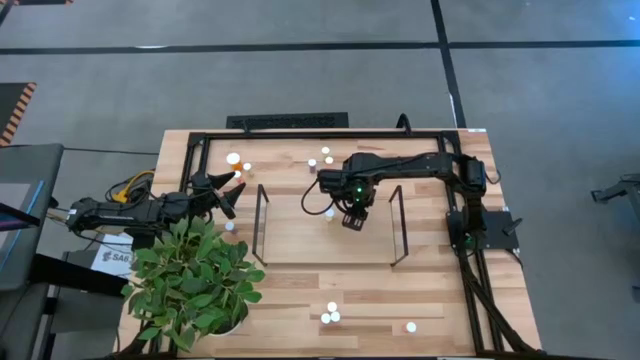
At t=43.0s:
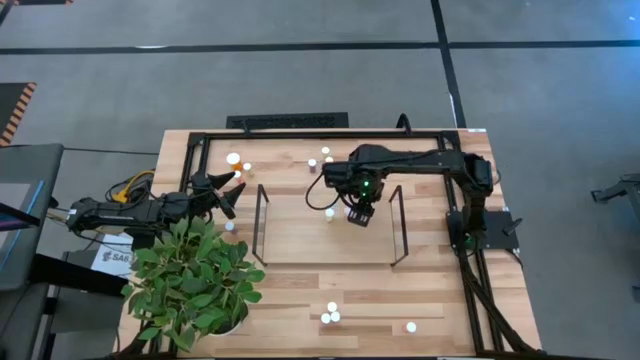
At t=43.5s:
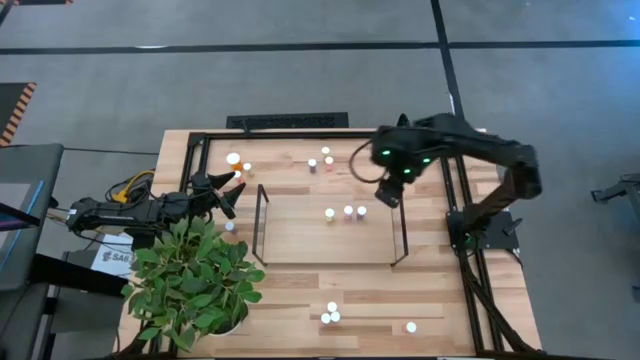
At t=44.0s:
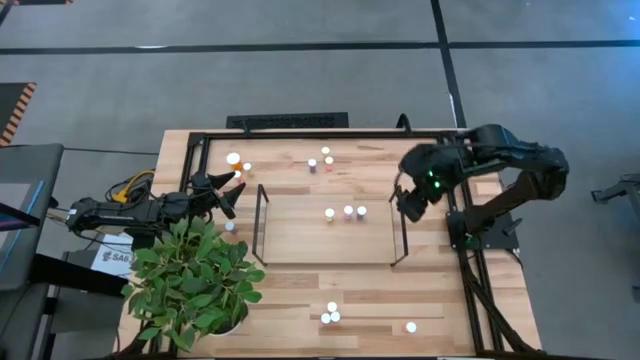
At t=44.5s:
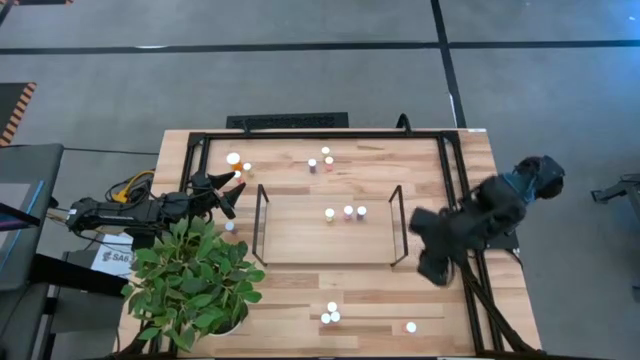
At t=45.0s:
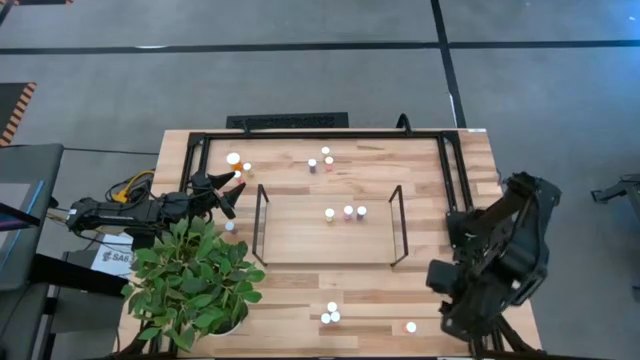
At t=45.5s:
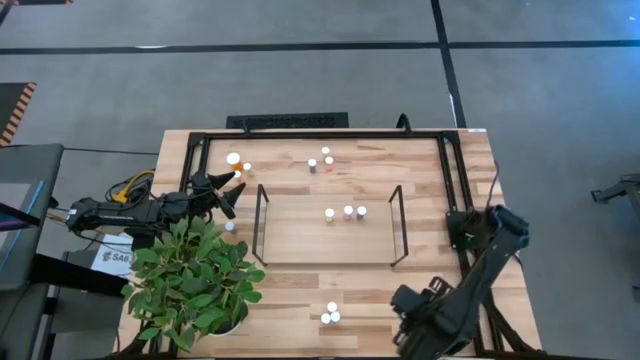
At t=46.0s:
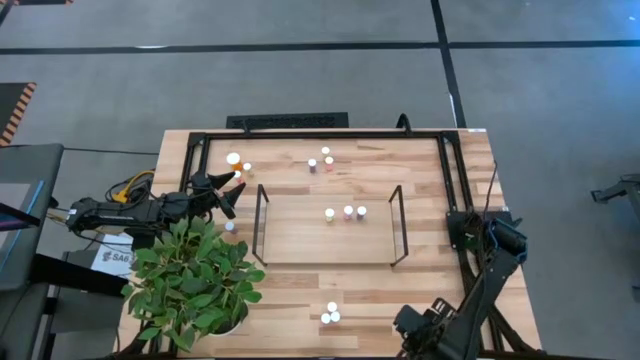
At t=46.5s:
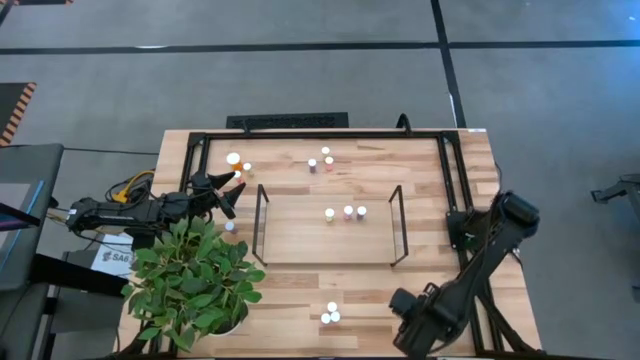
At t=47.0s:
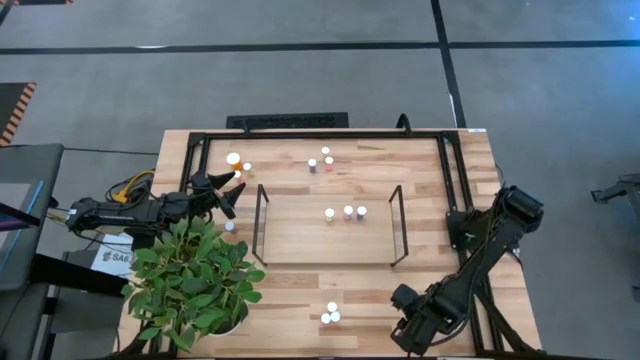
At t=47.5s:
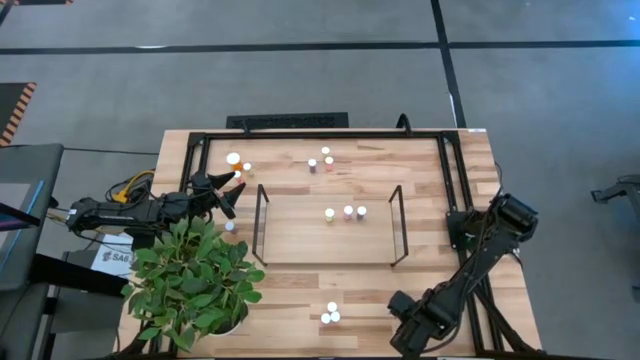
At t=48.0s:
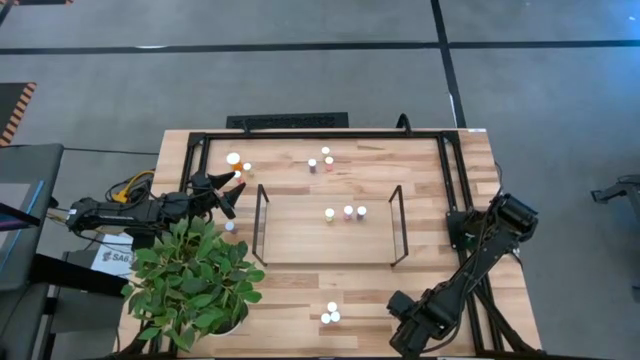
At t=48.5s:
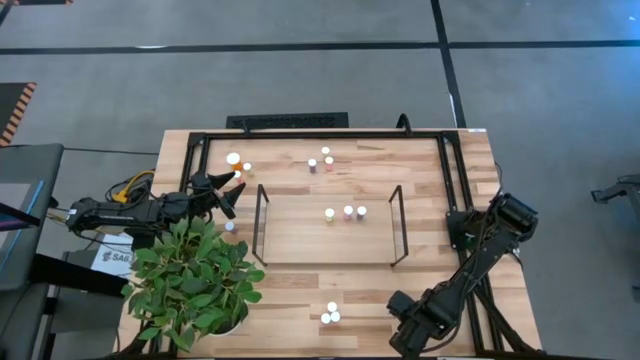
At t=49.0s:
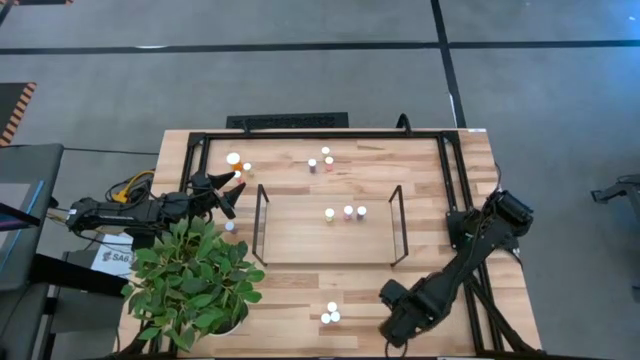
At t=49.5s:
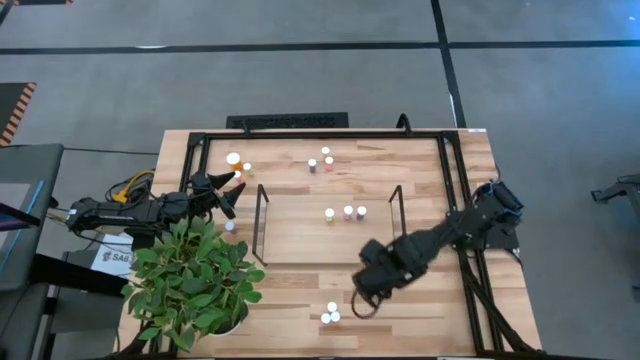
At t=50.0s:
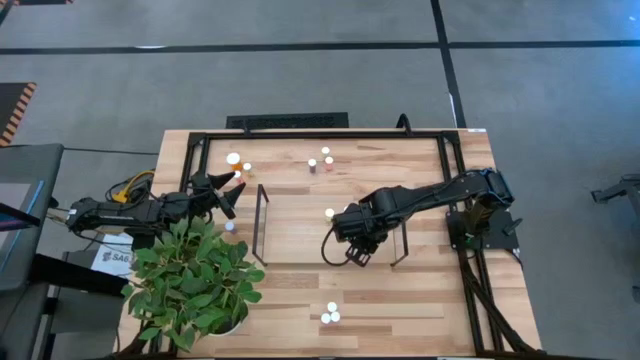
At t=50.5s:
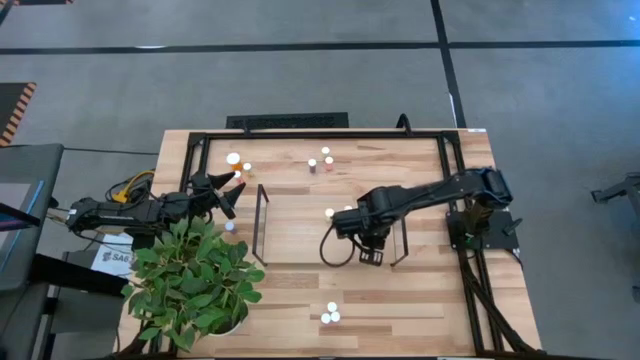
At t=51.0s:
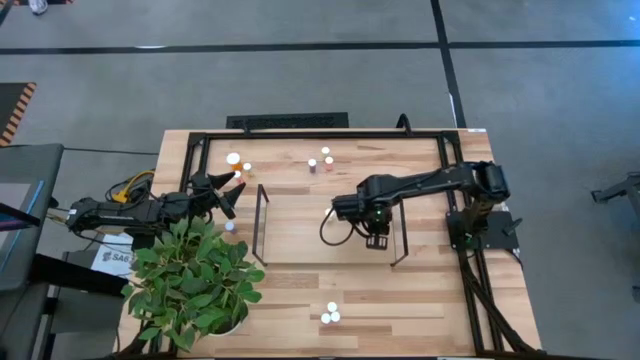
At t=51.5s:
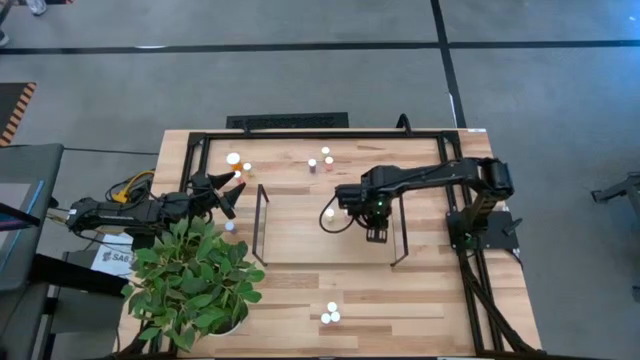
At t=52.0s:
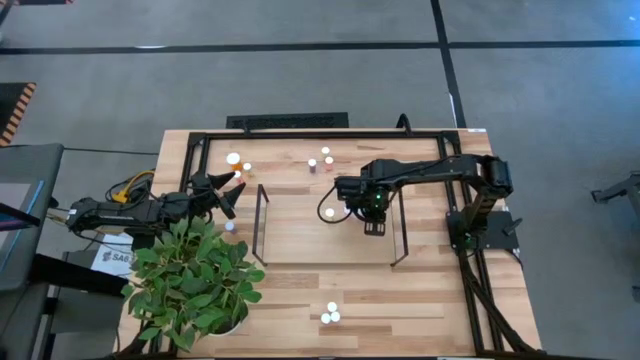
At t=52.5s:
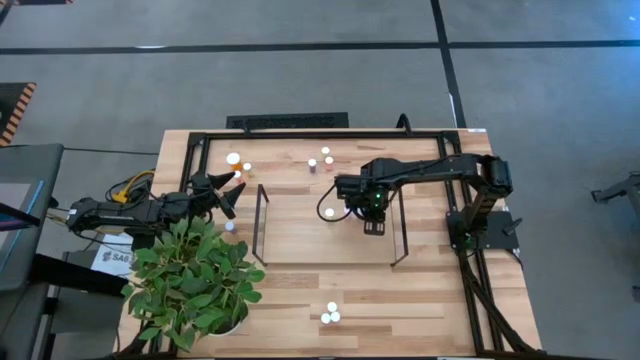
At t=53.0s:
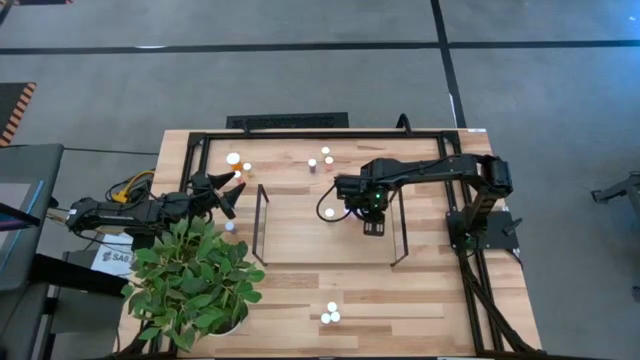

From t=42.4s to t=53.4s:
Task: Pick and place medicine bottles onto shelf by color
Put the red pill bottle on the shelf

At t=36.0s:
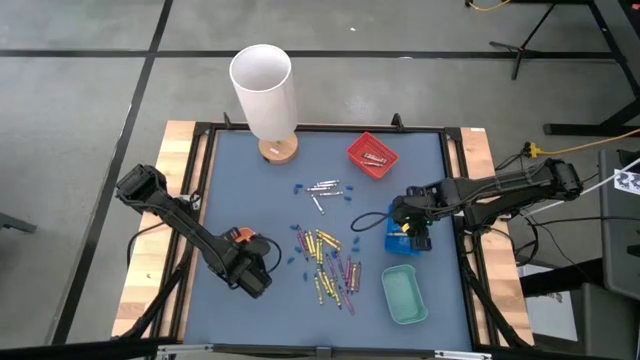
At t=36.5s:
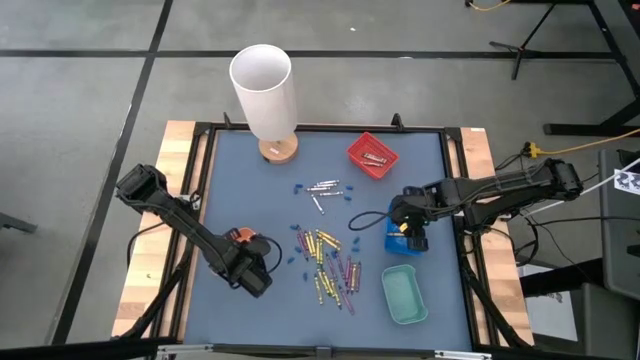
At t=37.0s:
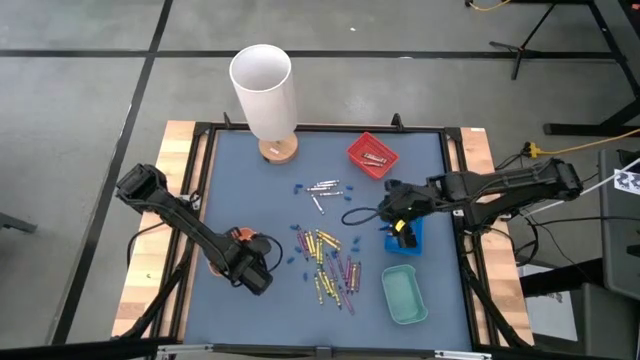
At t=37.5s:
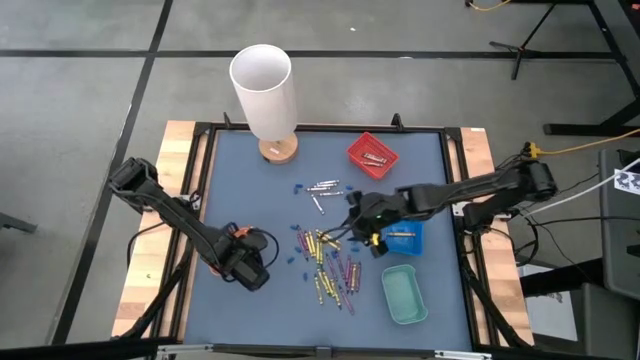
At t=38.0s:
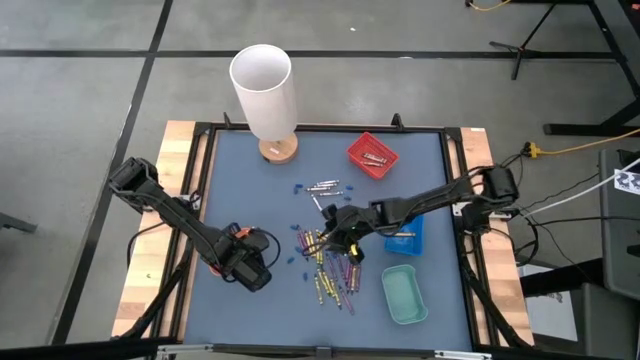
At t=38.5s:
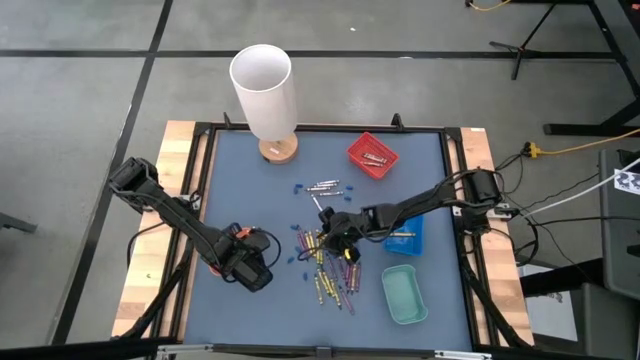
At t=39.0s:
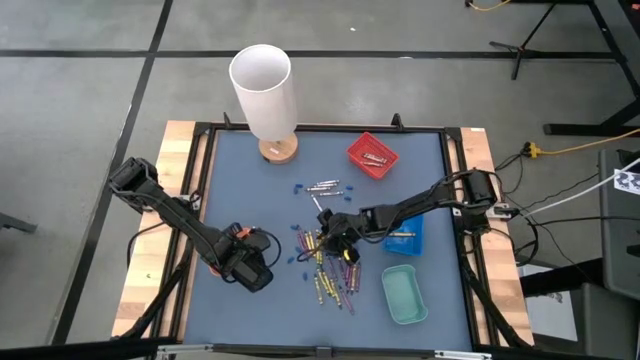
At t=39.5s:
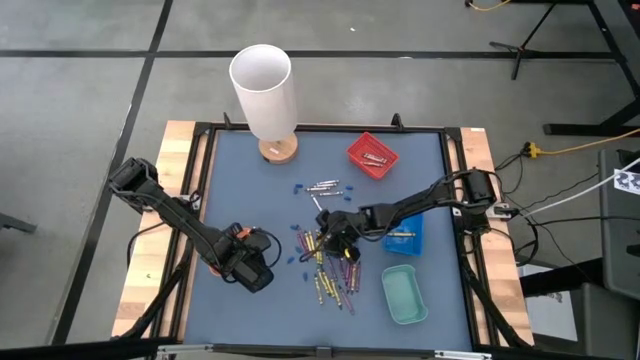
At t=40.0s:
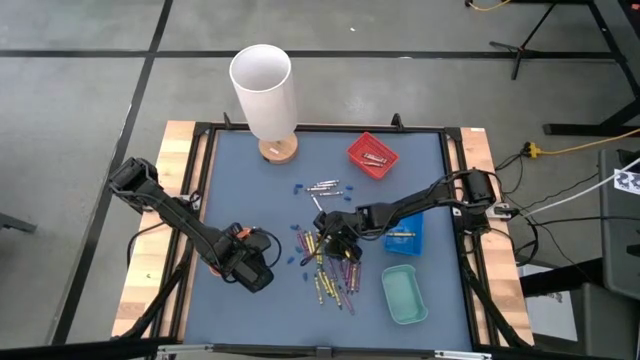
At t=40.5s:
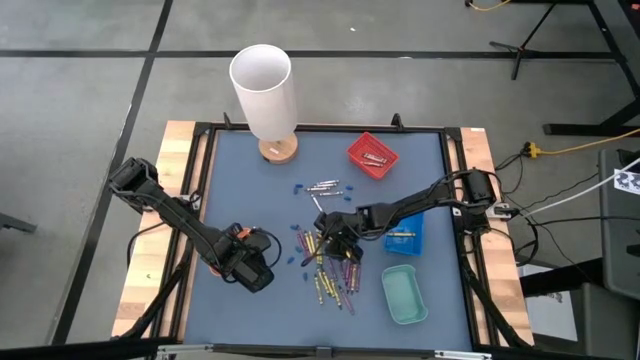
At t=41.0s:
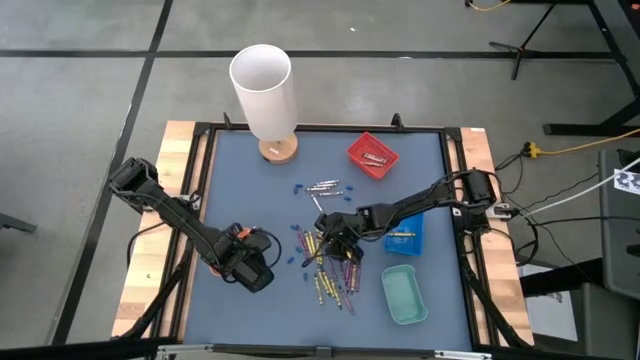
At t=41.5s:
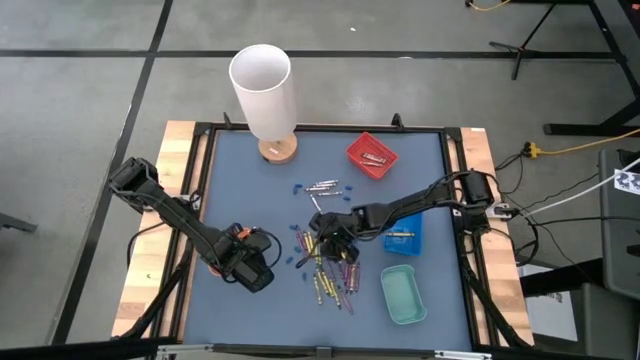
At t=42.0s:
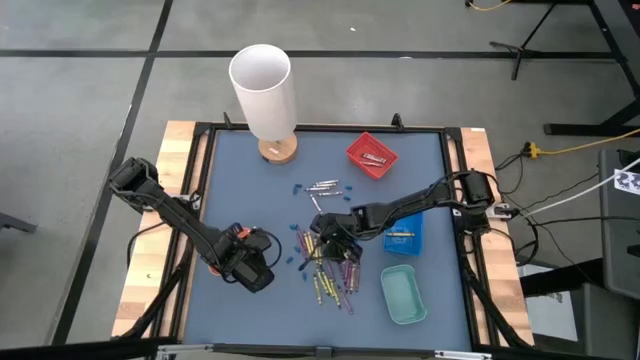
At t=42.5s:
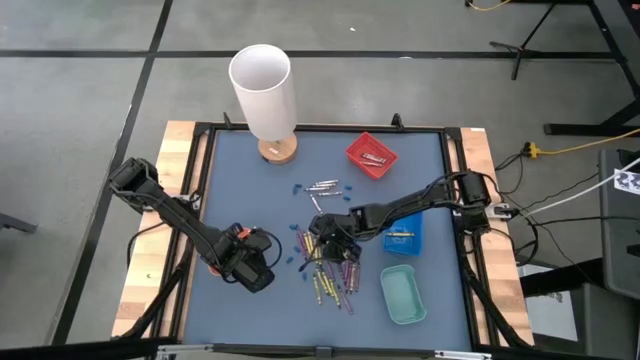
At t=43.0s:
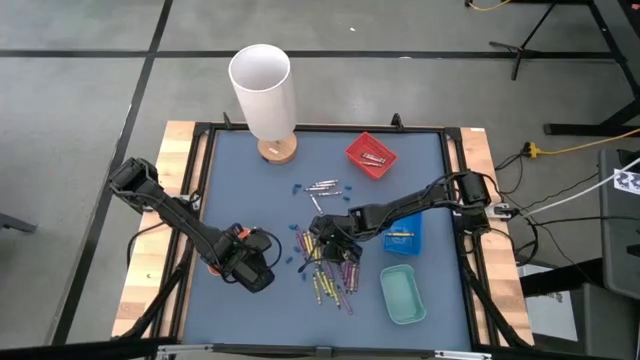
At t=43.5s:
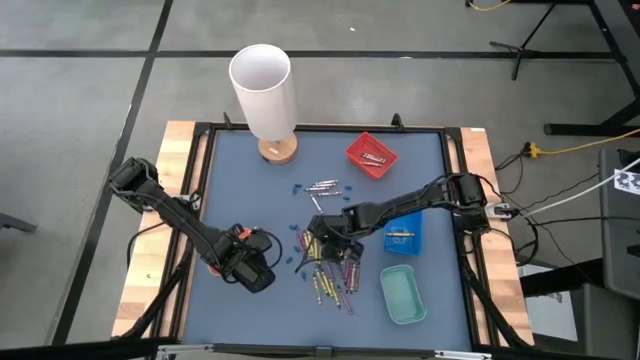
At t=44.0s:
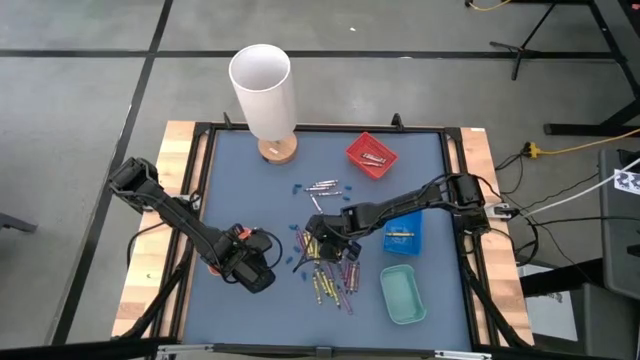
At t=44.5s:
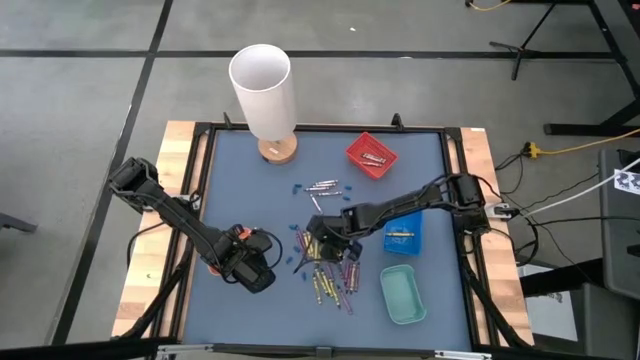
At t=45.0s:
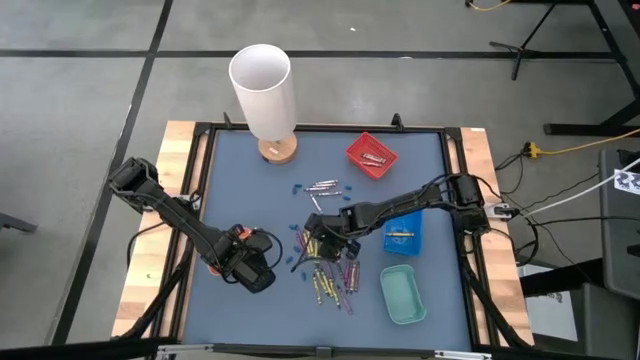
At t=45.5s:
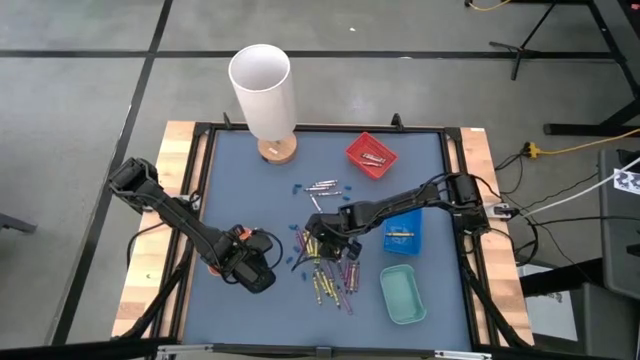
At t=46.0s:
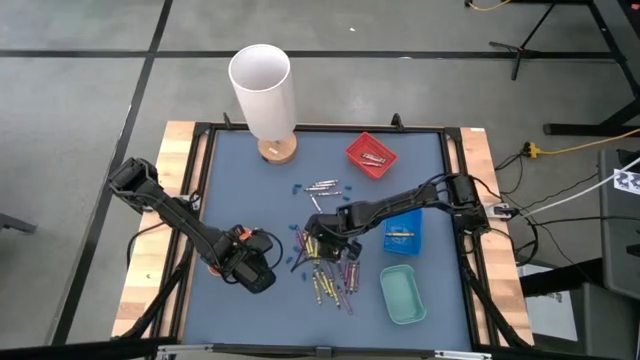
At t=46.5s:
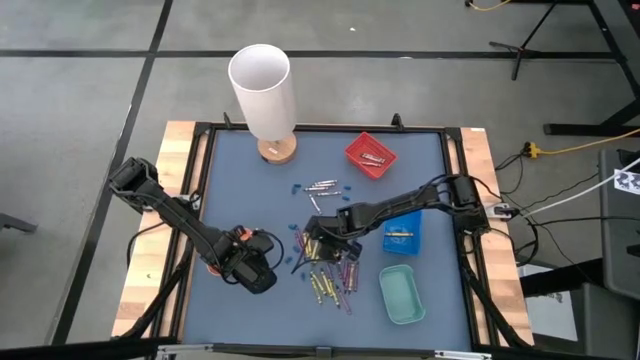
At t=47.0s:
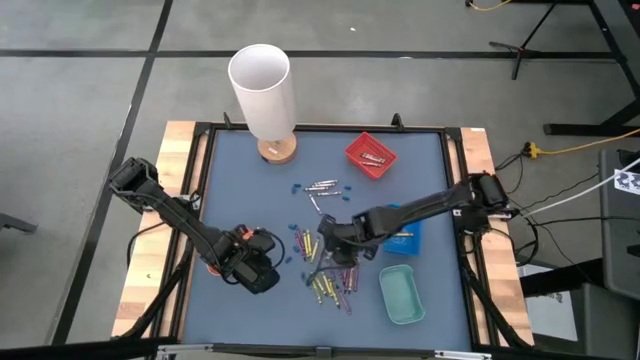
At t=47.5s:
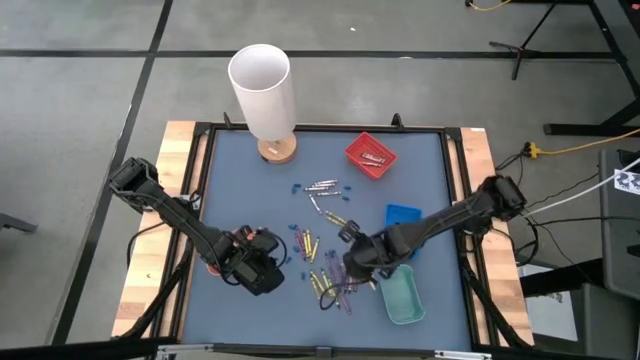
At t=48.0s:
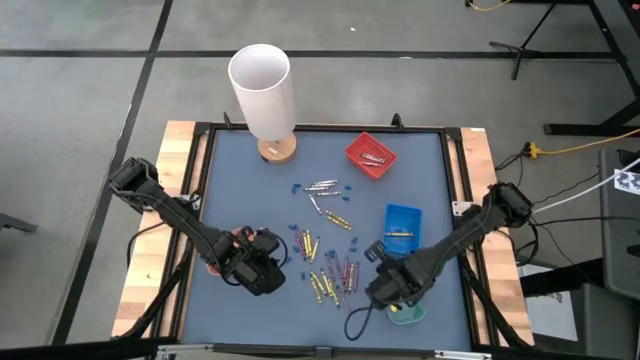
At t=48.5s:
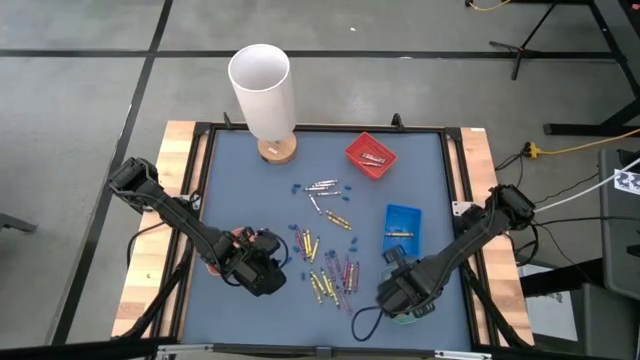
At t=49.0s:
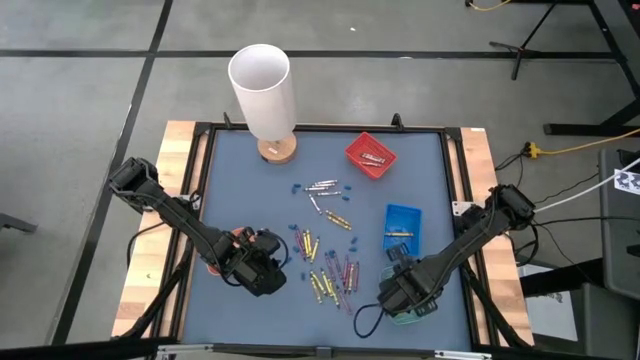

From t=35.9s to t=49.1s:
Task: Sort crayons
Put the green crayon into the green bin
